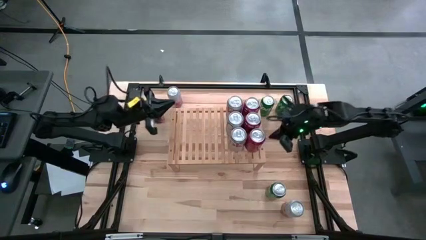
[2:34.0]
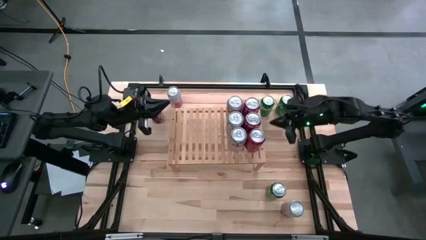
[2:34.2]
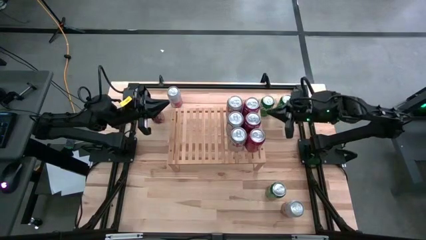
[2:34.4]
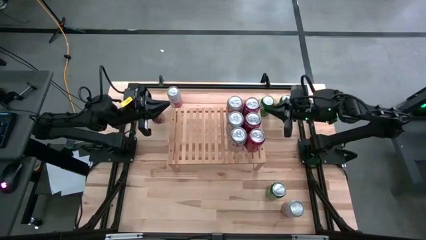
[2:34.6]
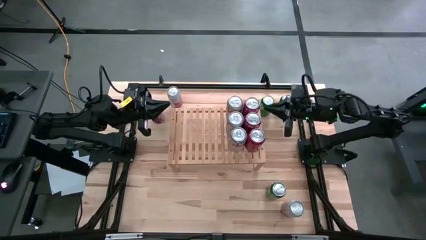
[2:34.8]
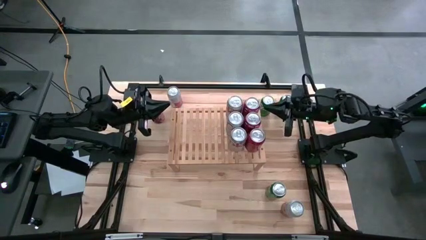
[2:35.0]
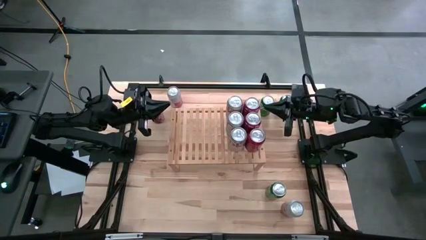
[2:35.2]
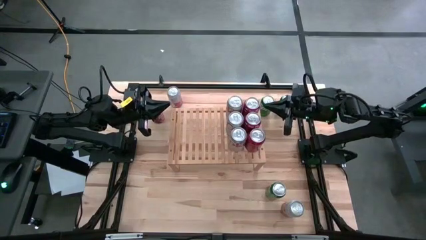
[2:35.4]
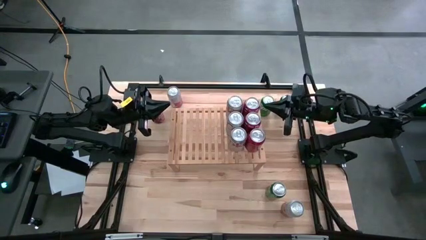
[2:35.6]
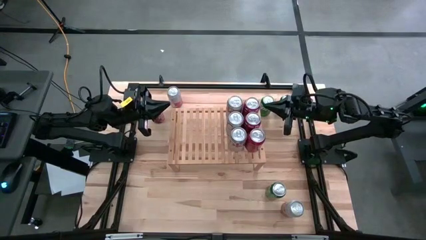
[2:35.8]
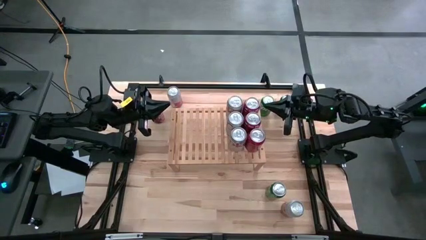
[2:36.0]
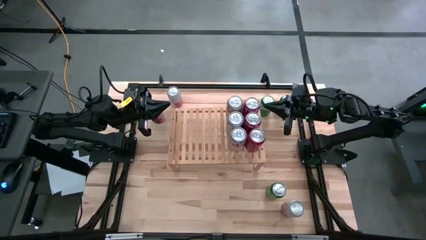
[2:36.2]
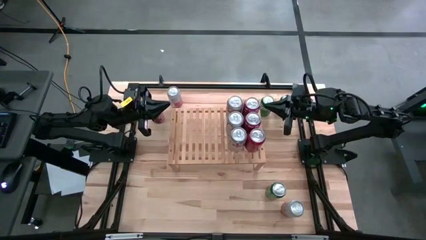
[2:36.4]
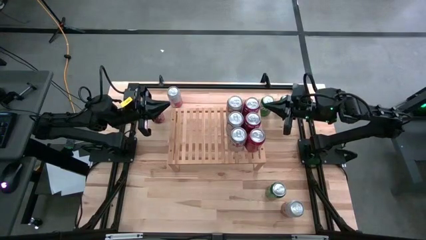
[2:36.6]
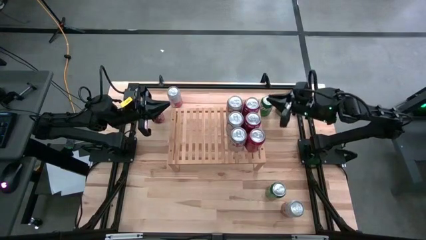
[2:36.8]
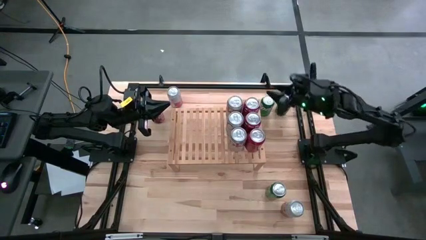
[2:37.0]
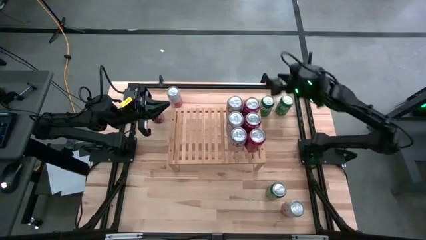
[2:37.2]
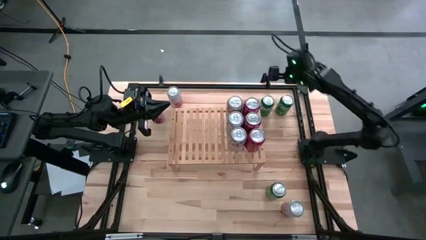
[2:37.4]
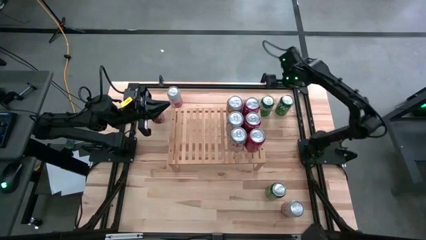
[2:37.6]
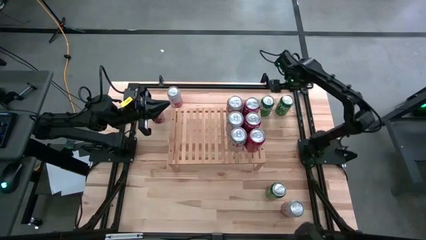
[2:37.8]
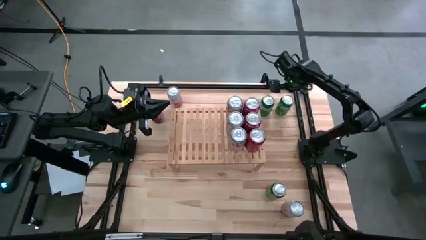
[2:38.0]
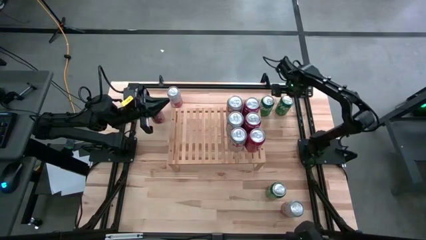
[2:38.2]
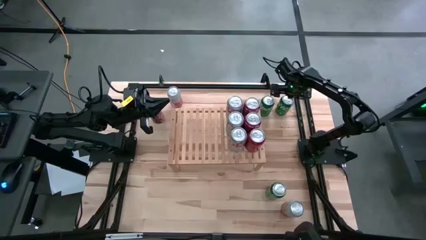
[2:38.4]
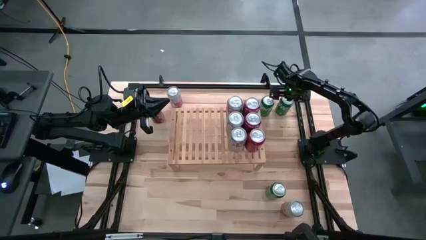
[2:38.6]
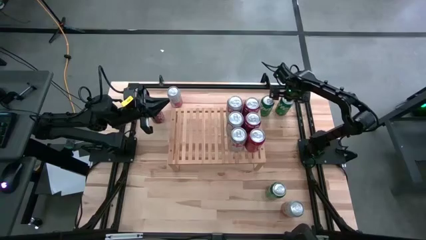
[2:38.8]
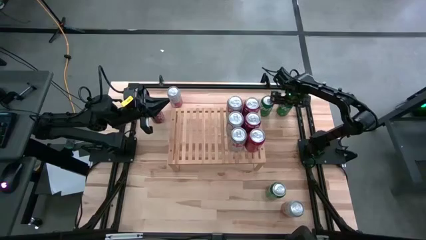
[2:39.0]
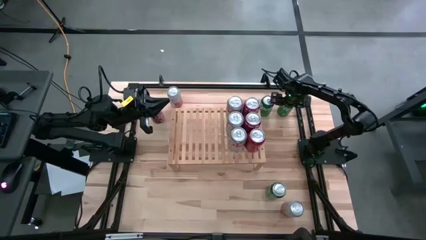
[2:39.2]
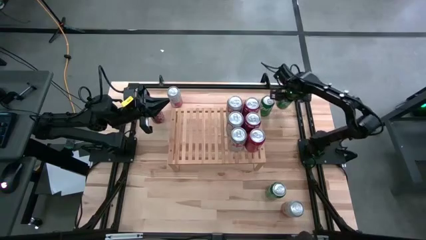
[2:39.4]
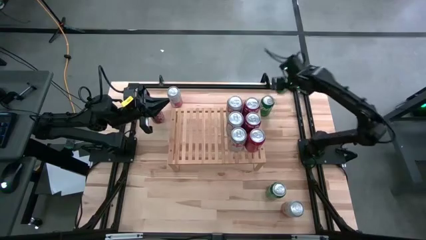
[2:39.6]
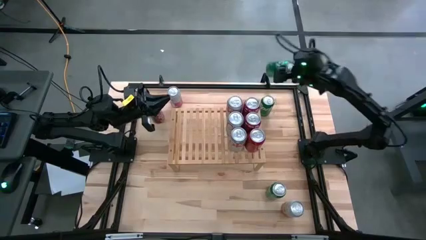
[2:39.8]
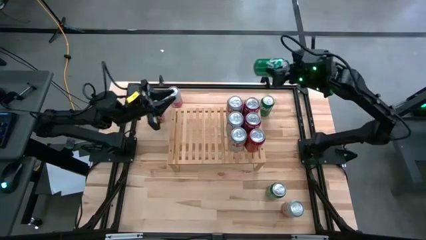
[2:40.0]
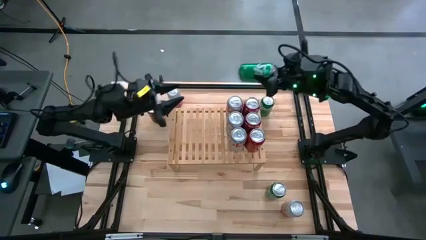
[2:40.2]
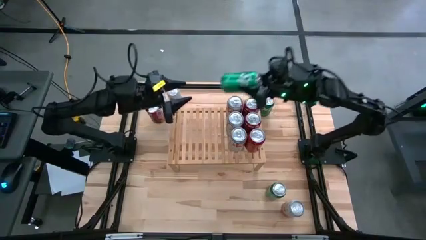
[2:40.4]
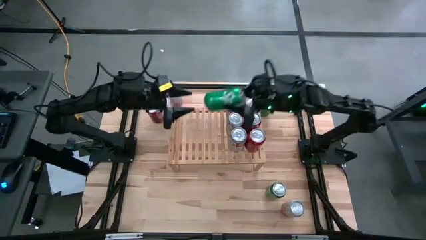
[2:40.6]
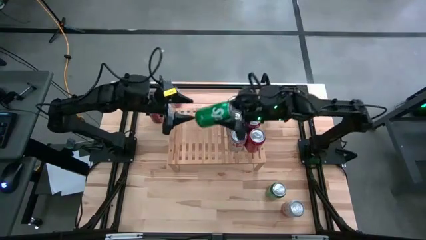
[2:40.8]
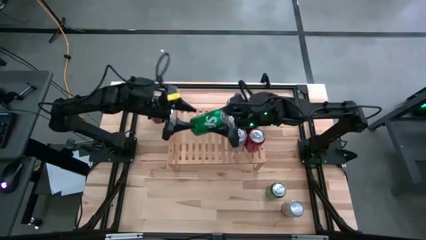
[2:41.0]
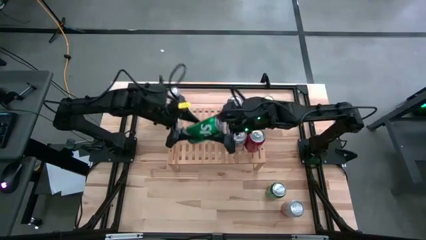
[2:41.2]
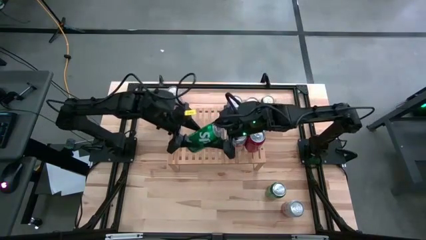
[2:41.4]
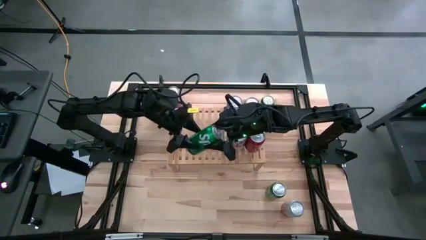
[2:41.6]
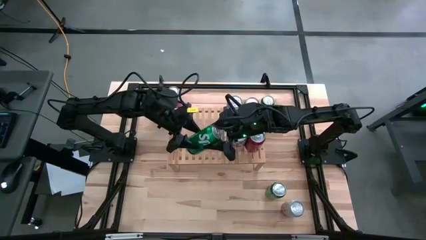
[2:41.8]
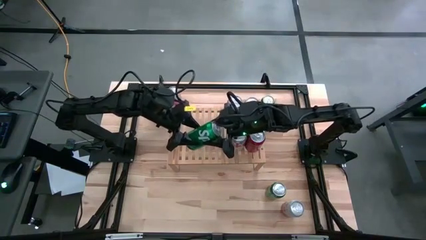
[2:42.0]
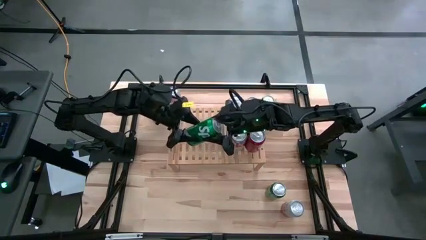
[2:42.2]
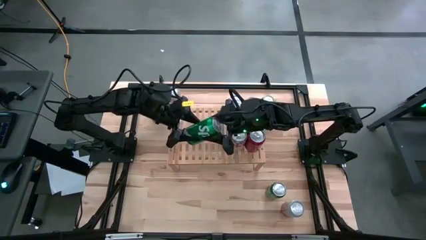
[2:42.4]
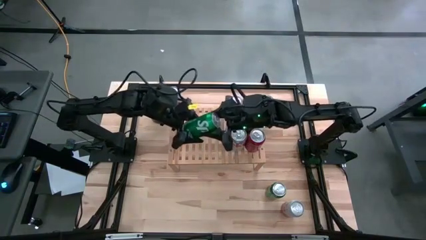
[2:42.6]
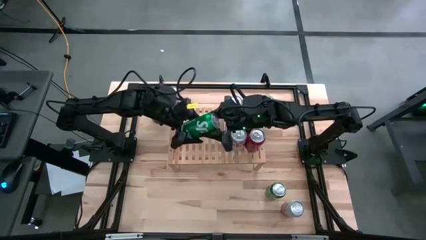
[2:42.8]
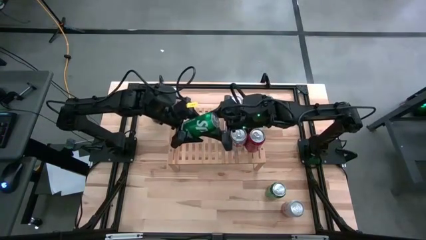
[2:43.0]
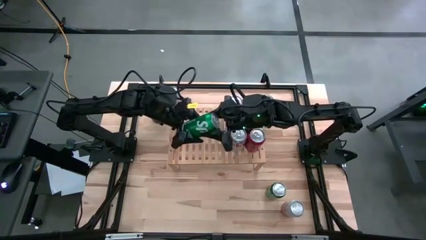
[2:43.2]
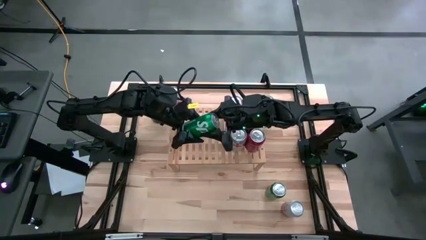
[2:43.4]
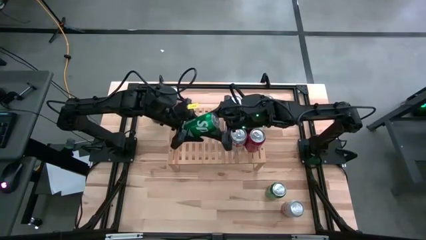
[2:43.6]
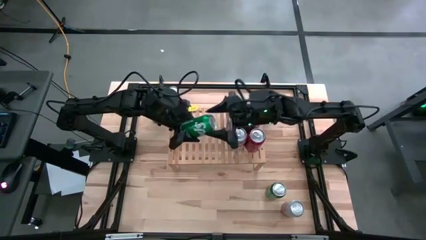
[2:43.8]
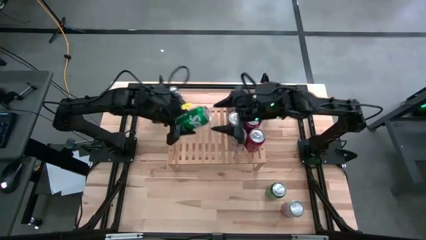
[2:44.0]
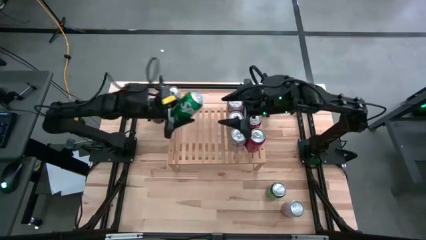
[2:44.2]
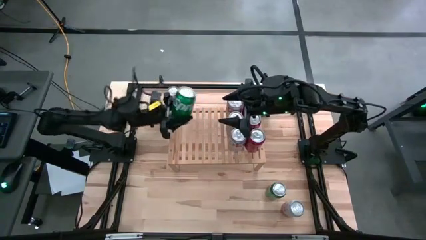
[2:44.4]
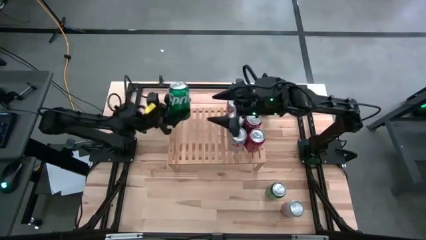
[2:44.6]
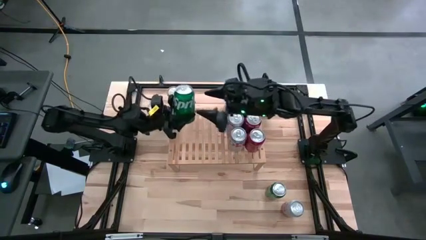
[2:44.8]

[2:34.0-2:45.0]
Task: Place canned beverage on shelf
Put the top right green soda can on the shelf

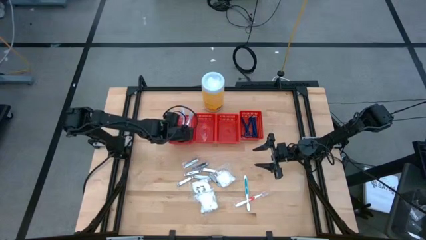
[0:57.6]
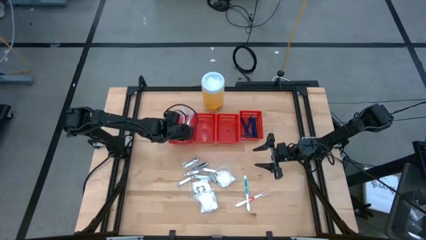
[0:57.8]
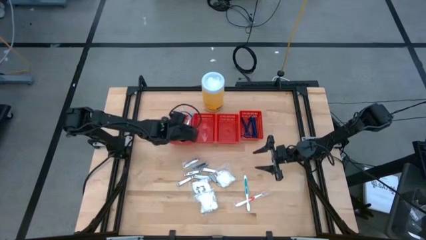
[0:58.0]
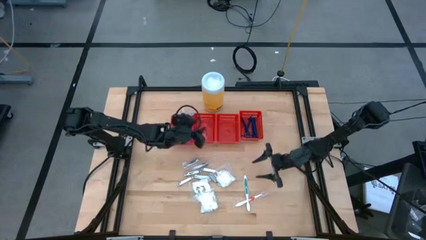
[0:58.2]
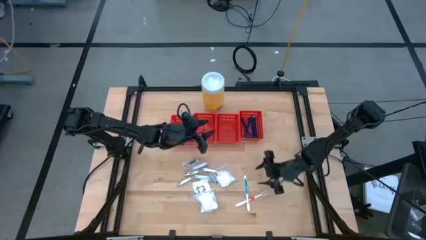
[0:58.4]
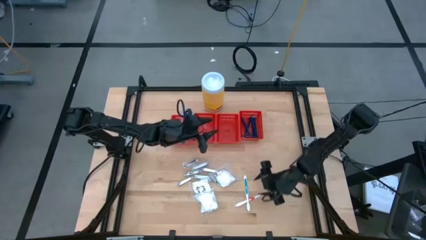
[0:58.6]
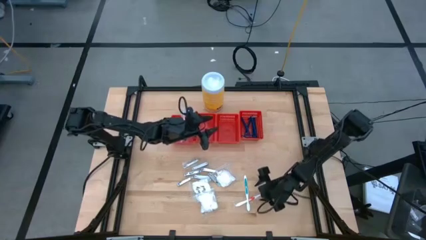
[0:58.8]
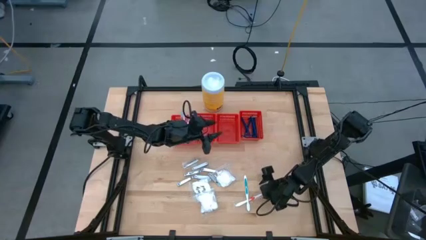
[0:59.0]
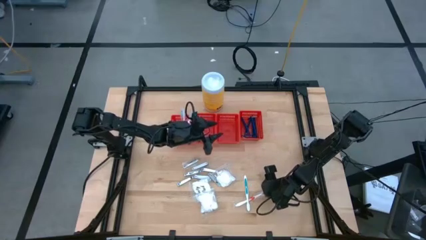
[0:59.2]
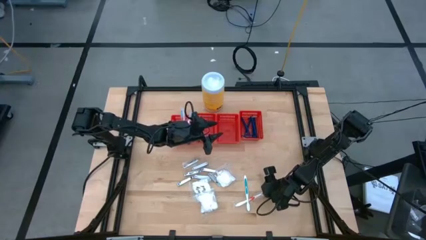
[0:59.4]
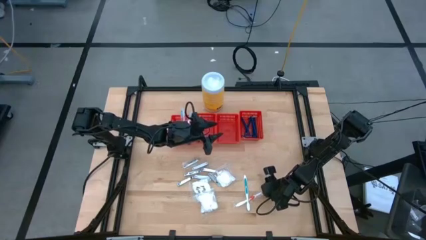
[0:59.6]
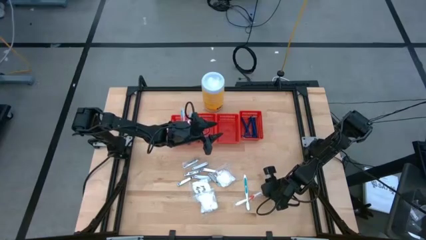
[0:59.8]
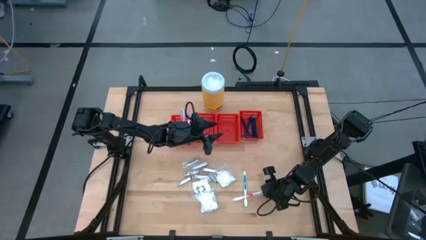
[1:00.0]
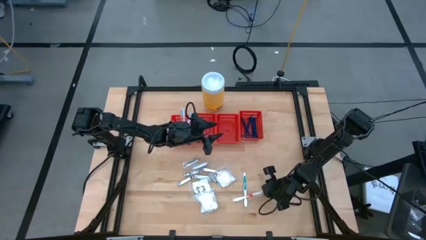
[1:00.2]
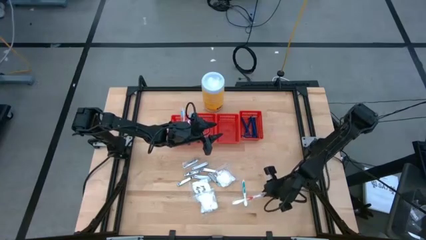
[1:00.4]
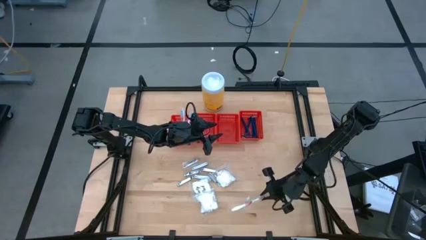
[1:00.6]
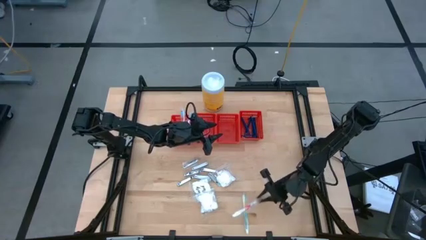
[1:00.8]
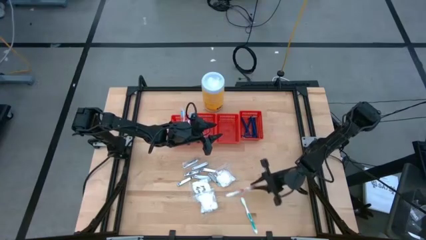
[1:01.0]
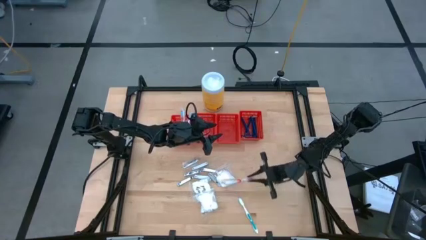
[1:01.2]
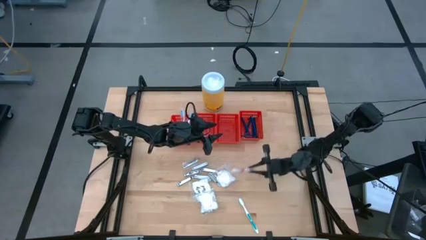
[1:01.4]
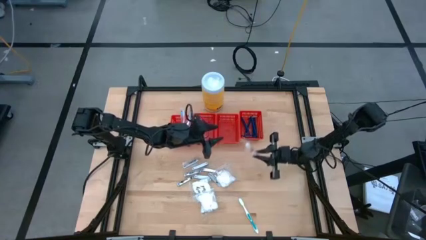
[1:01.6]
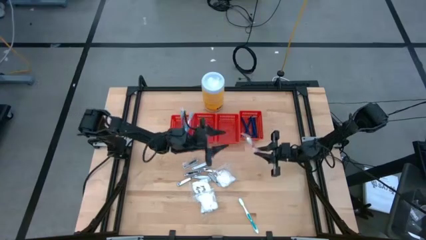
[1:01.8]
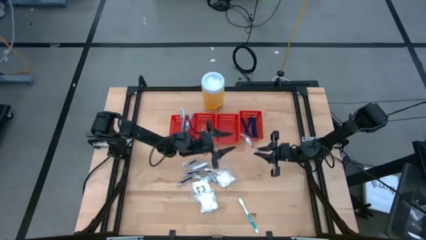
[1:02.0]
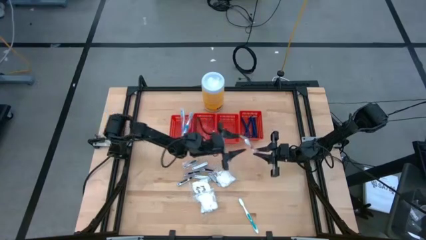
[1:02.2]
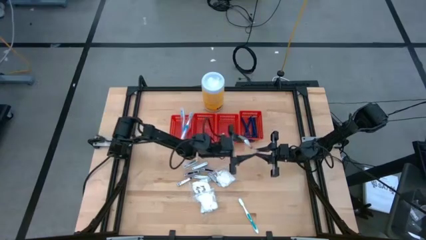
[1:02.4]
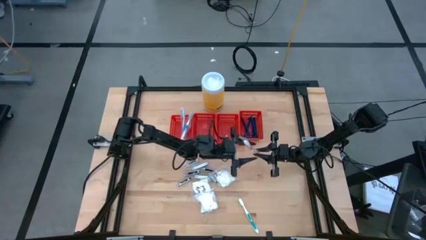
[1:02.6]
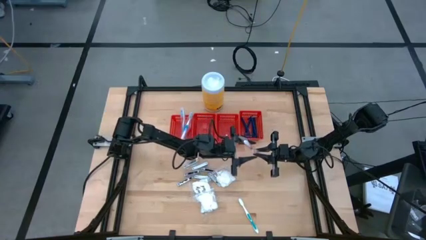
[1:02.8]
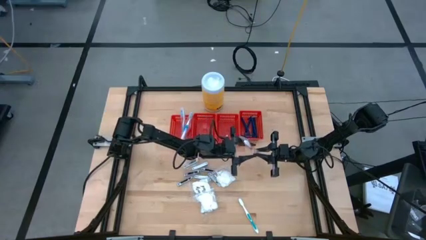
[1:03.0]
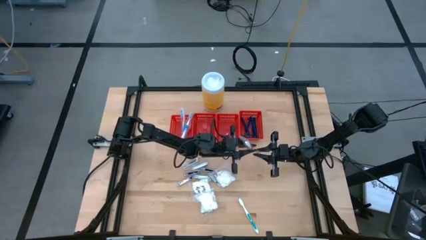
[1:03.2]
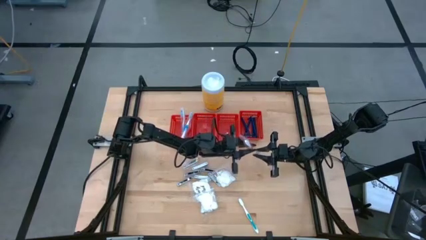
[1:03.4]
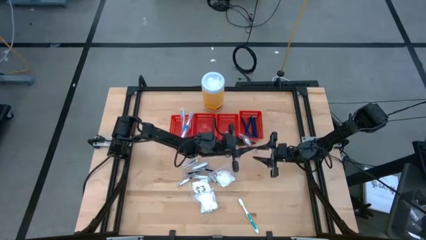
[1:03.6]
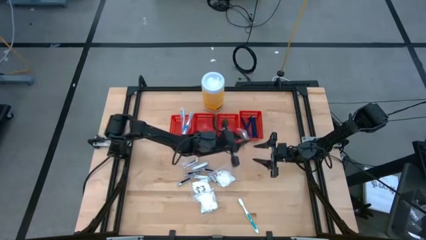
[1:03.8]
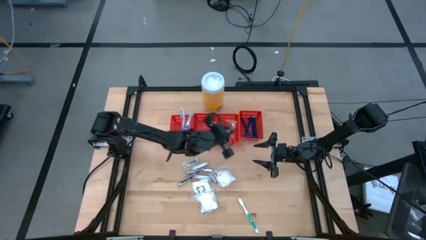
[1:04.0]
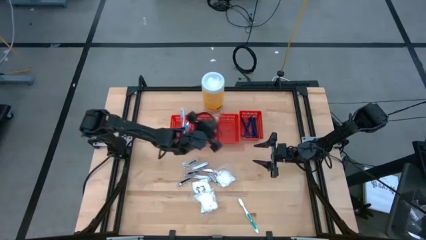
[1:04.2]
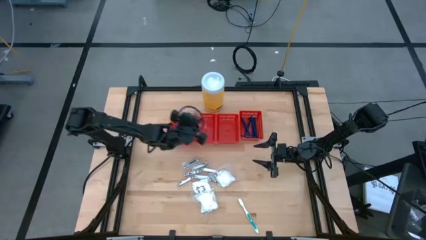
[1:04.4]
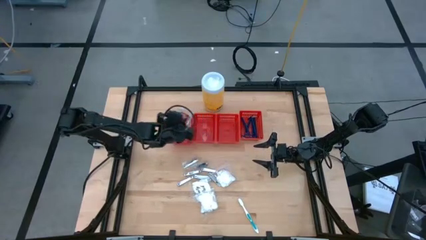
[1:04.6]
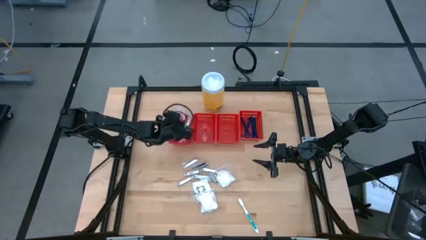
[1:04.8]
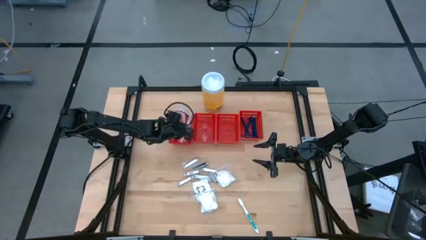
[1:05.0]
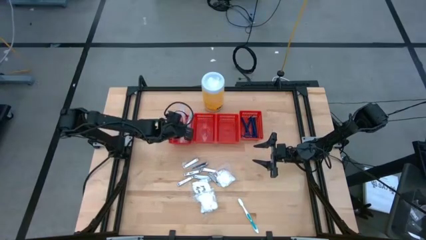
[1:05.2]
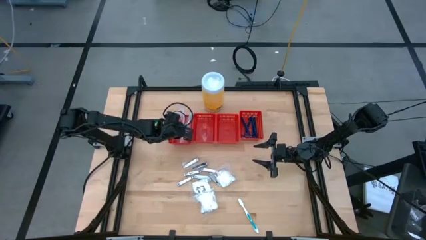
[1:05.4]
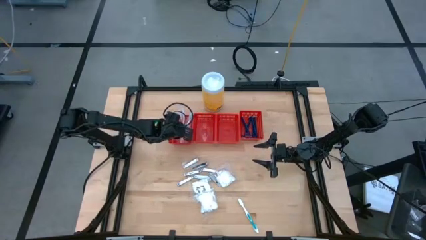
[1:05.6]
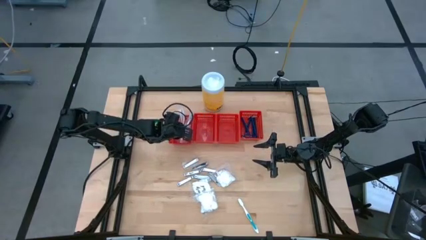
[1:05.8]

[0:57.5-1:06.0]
Task: Pick & Place Travel size toiletries
Put the red toothbrush into the left red basket
